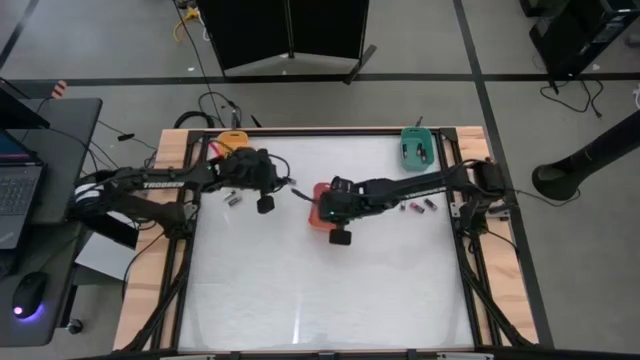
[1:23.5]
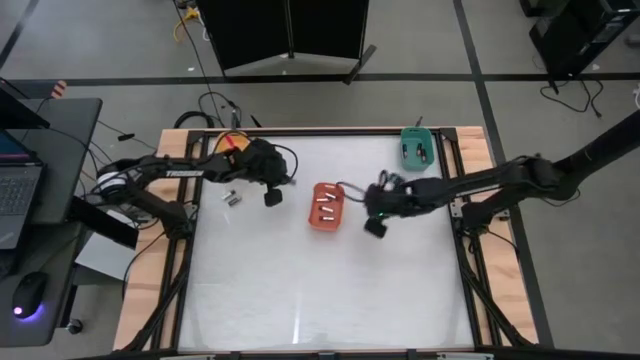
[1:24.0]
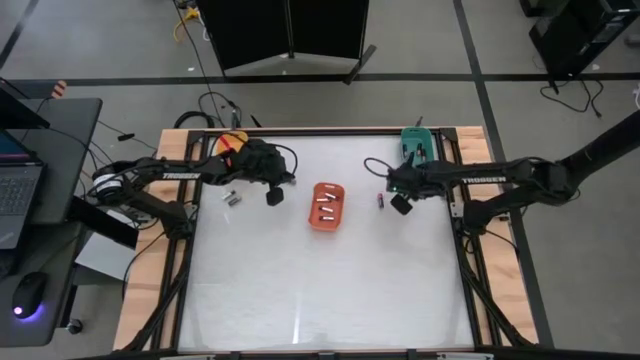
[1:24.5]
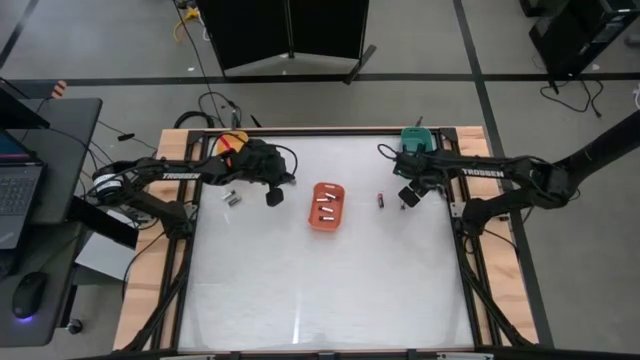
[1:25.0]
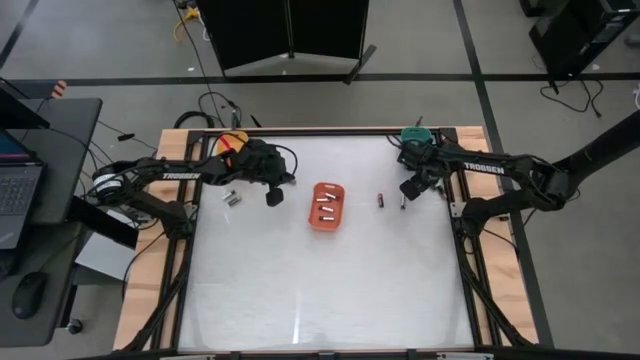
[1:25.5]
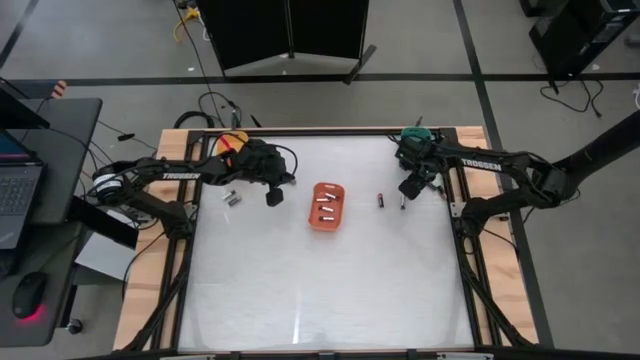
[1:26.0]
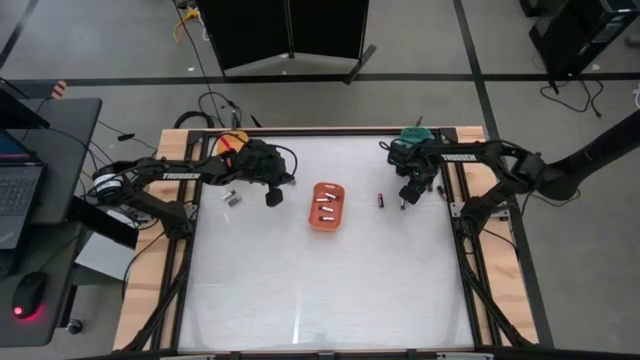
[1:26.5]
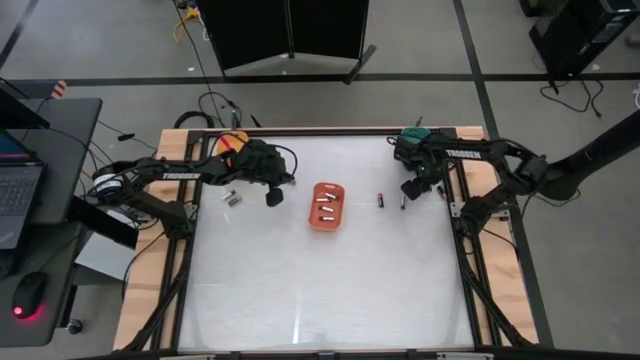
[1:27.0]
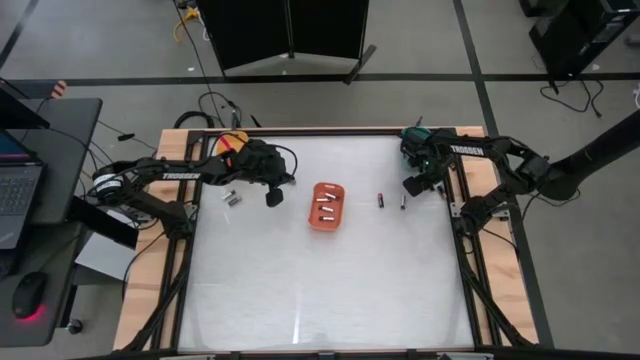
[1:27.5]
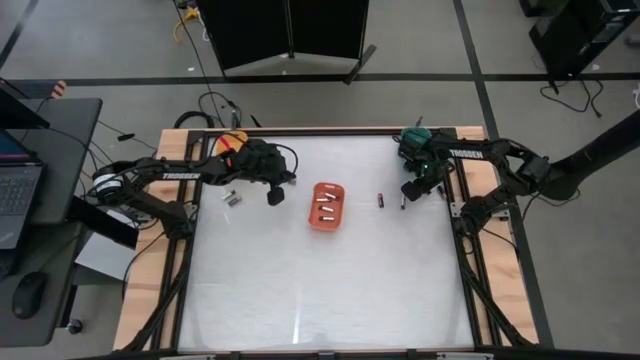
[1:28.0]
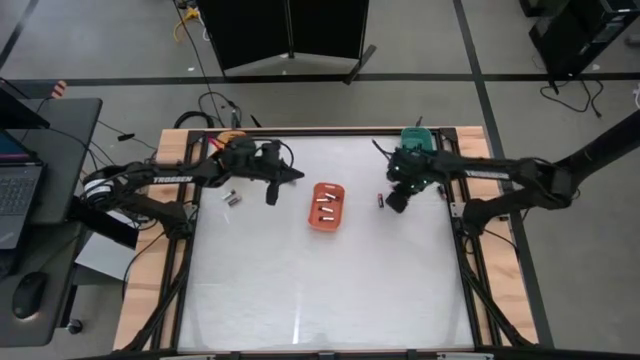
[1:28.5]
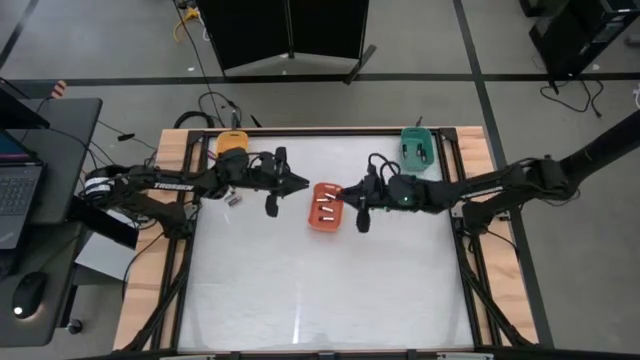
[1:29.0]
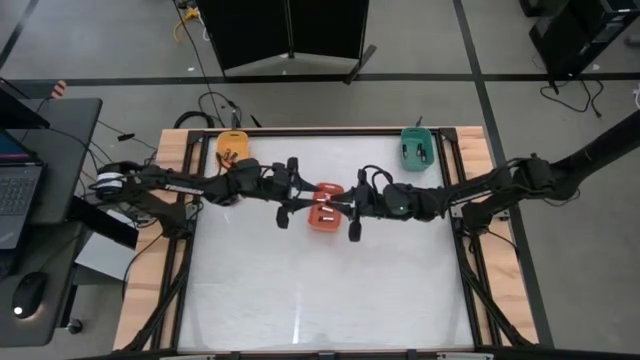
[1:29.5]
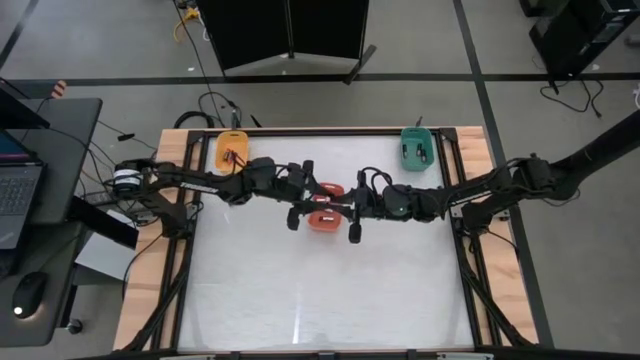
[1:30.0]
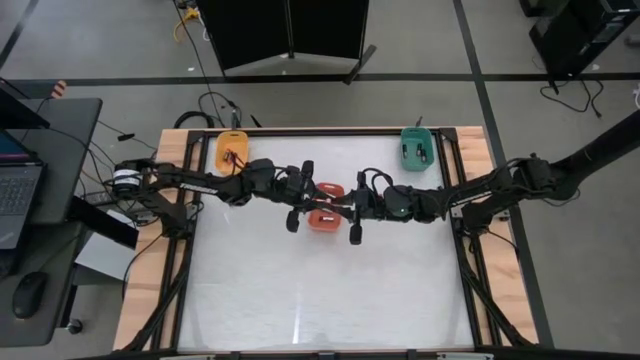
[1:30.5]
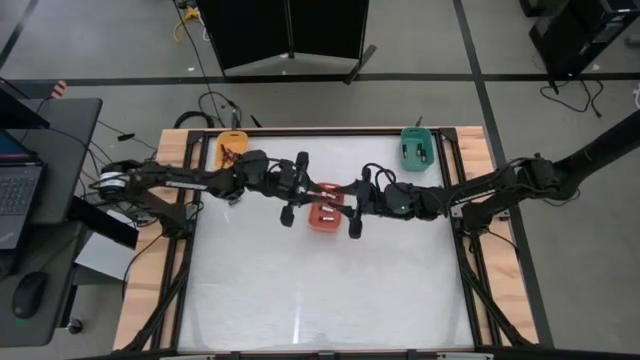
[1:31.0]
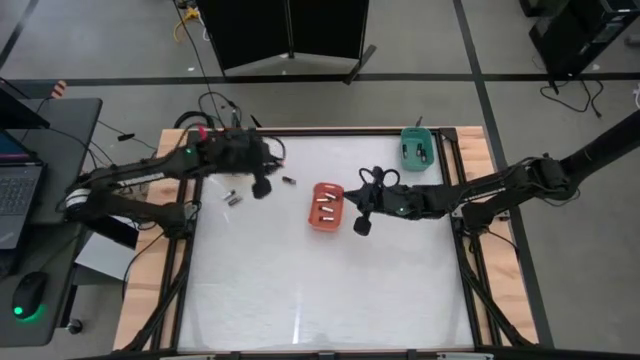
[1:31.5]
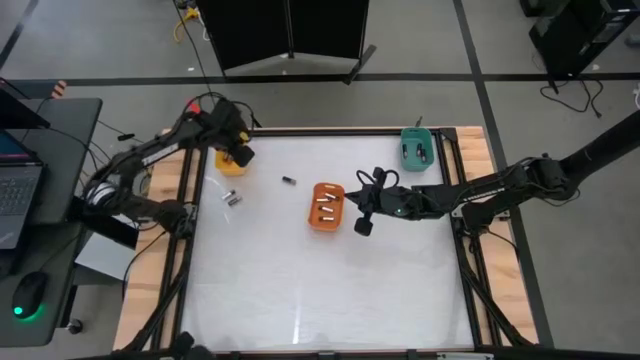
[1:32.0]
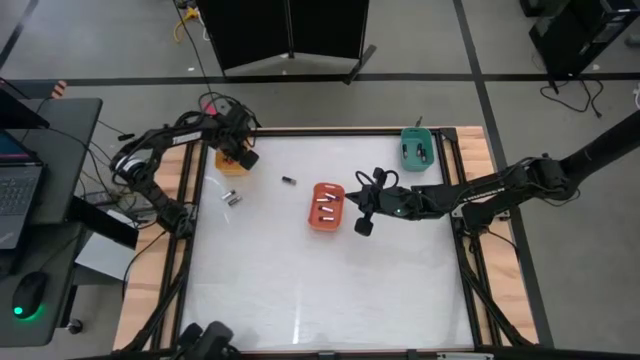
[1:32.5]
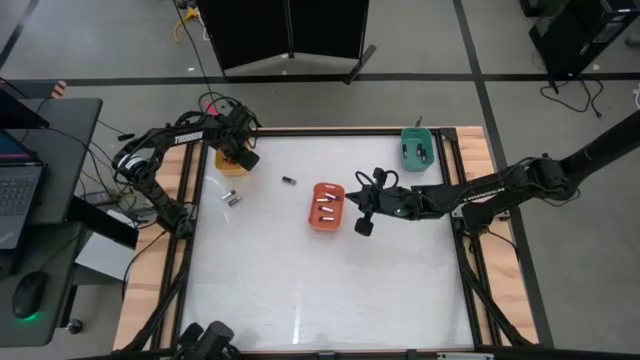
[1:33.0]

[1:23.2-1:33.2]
Task: Sort batteries
Put the black-red battery into the yellow bin

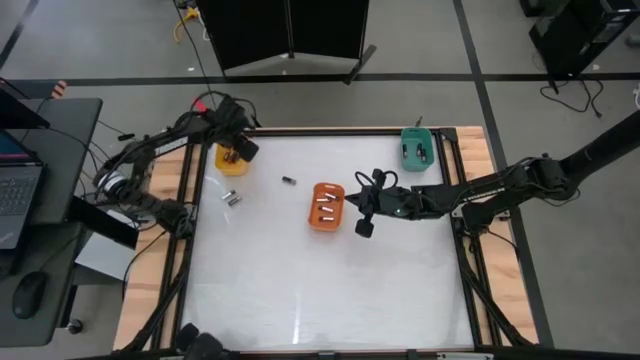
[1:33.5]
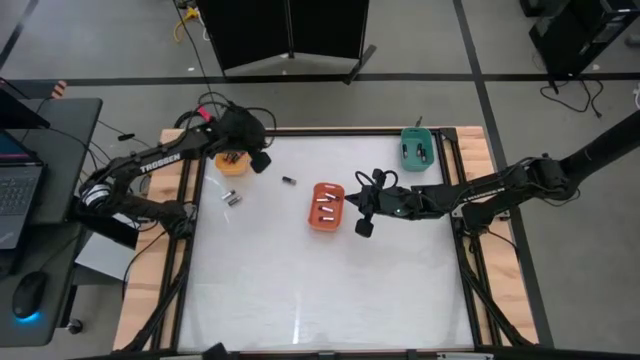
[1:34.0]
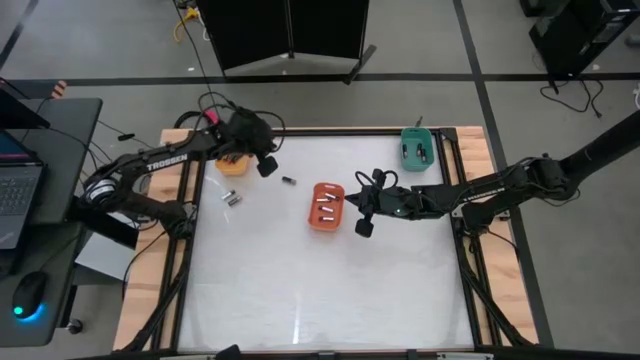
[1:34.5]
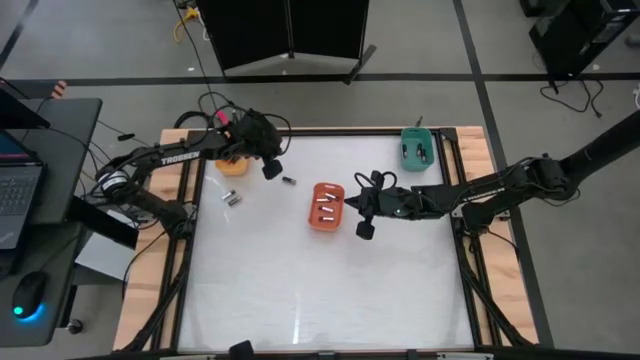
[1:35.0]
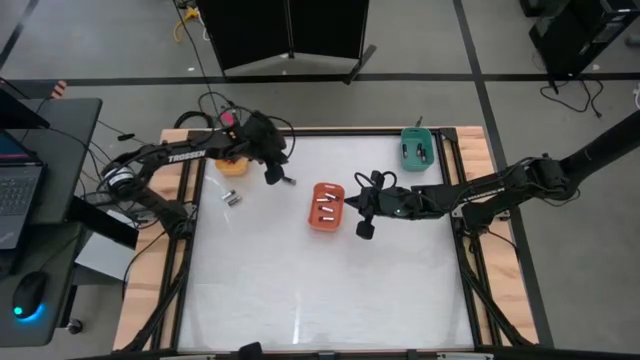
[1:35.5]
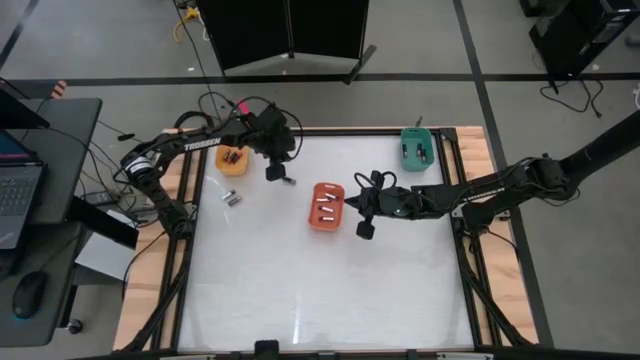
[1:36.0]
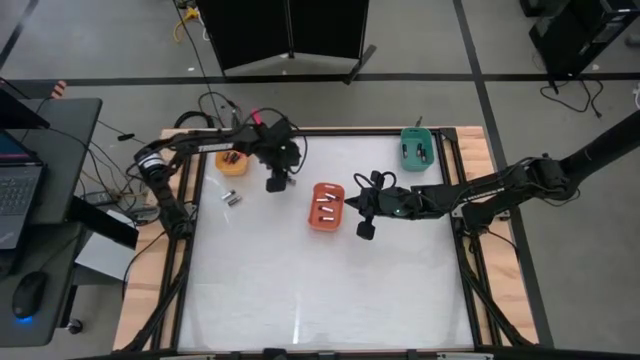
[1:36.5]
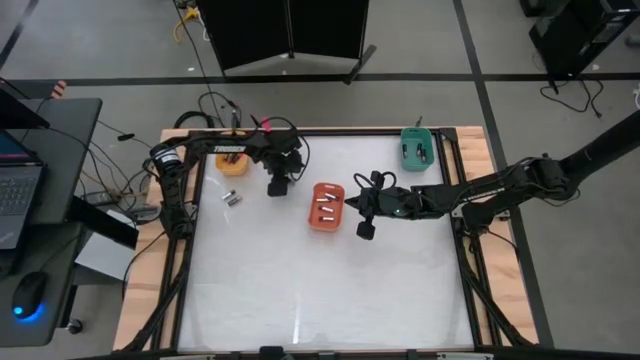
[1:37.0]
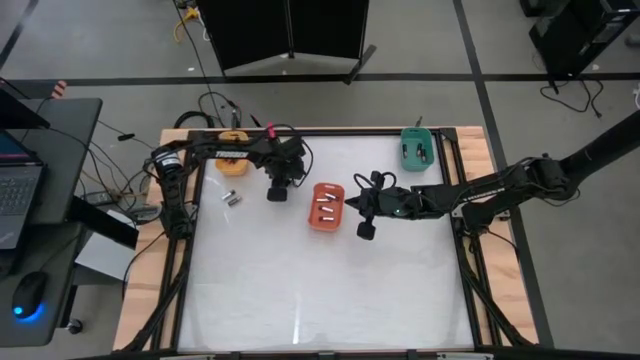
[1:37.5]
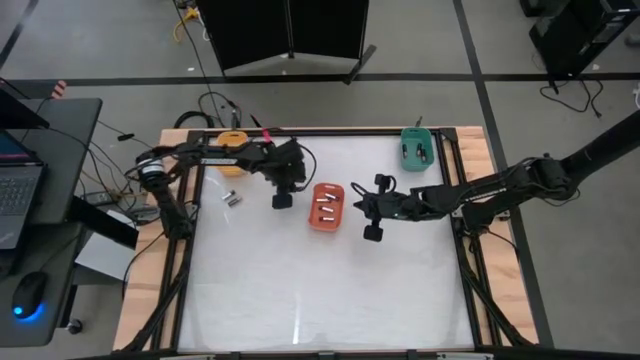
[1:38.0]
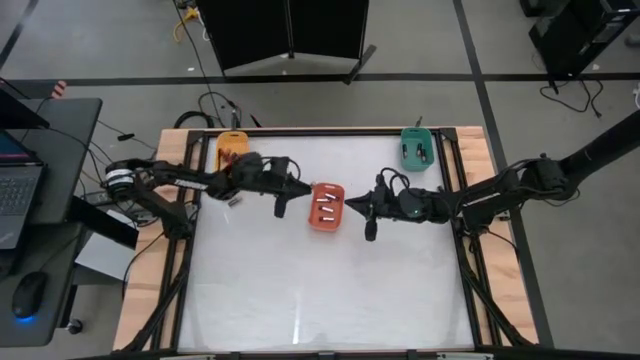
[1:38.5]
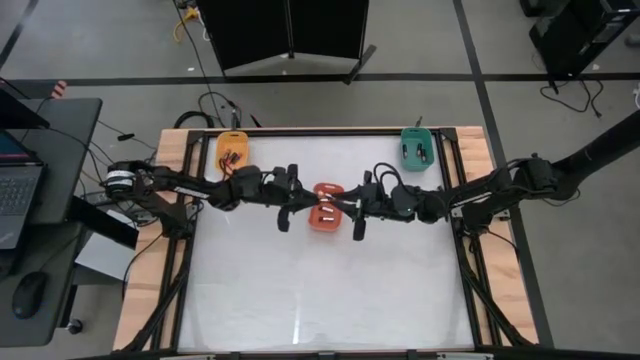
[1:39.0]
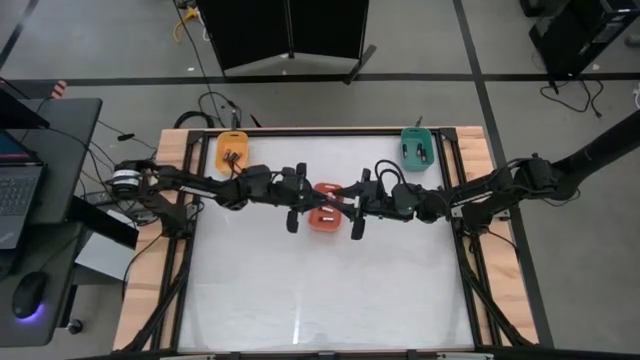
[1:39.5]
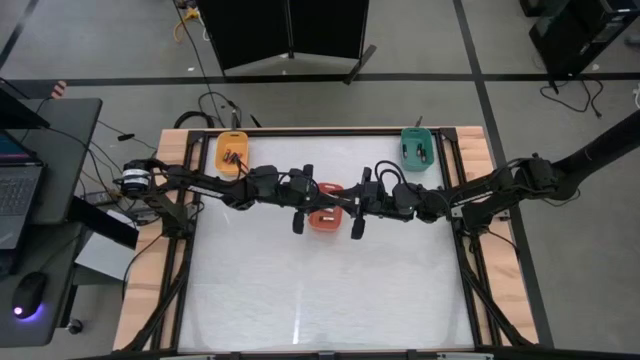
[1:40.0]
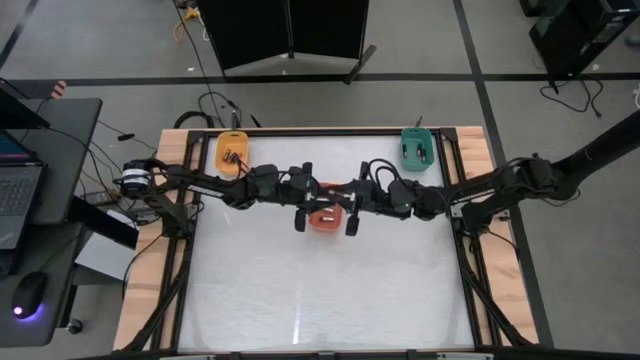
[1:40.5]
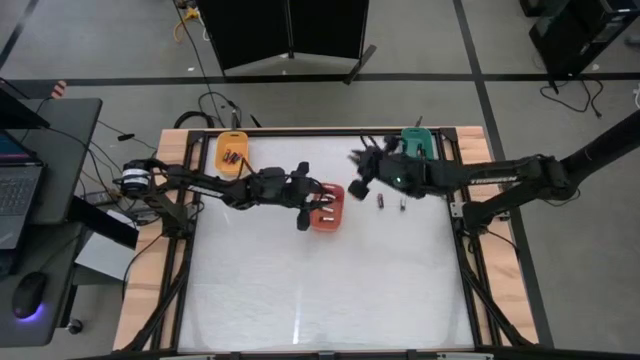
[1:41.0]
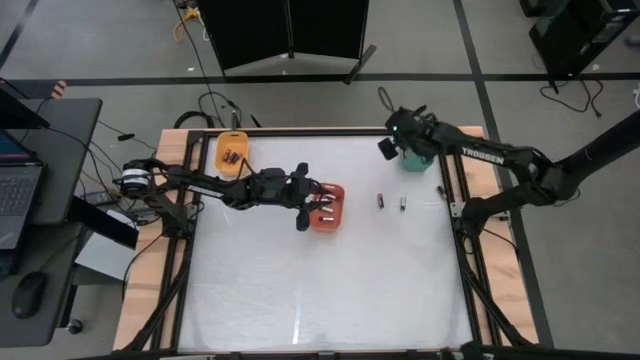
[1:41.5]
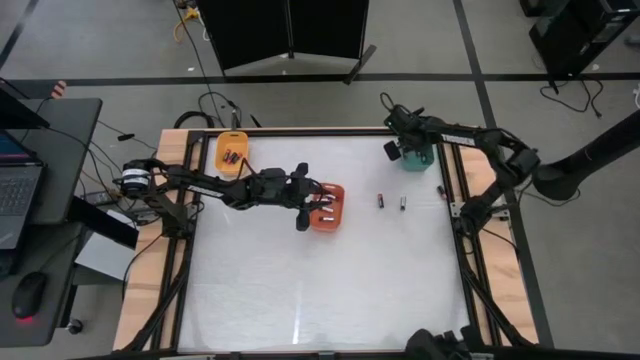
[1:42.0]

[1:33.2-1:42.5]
Put the black-brown battery into the green bin

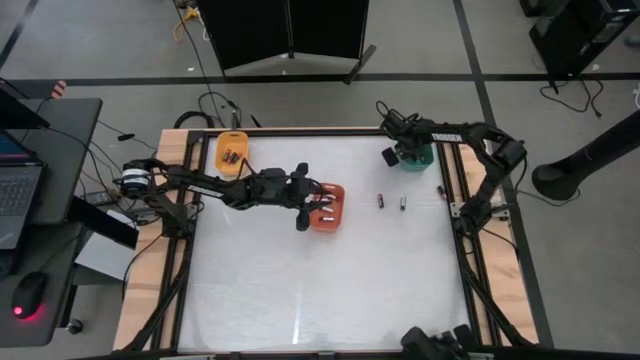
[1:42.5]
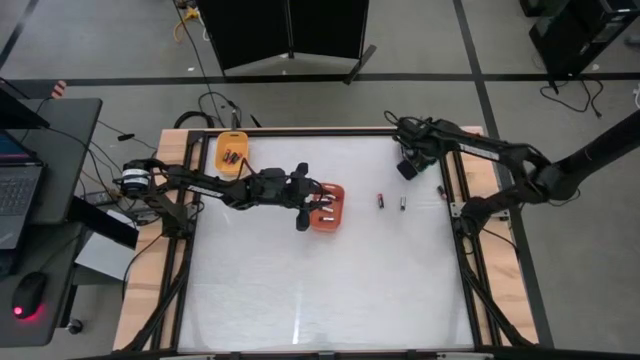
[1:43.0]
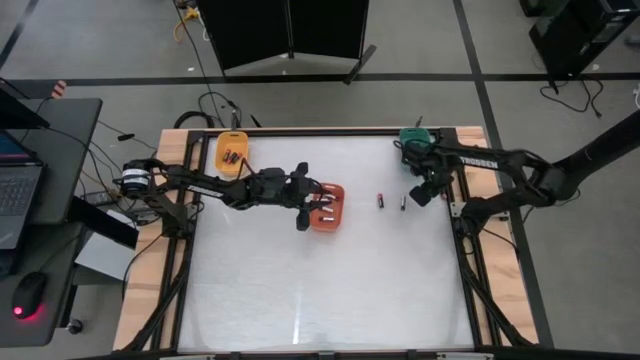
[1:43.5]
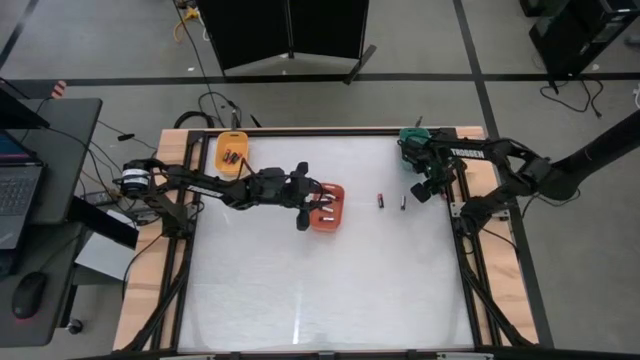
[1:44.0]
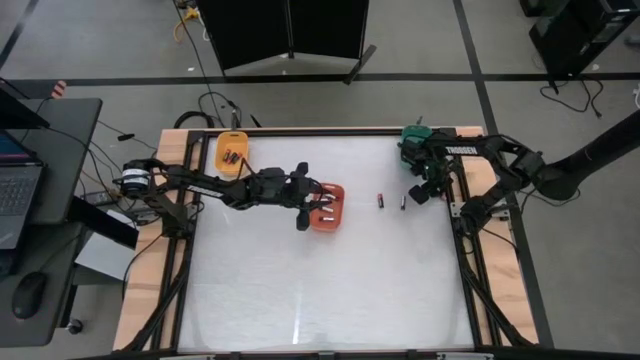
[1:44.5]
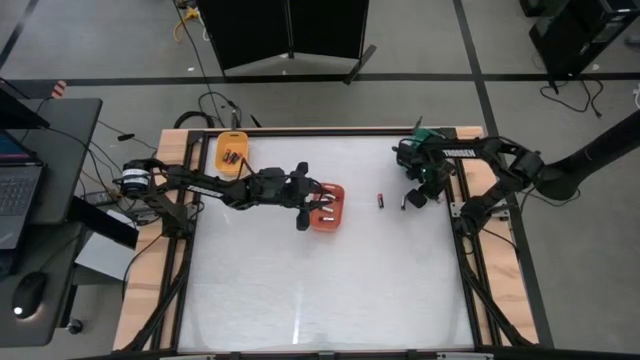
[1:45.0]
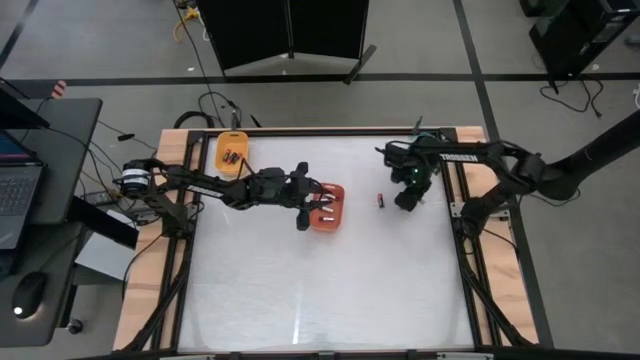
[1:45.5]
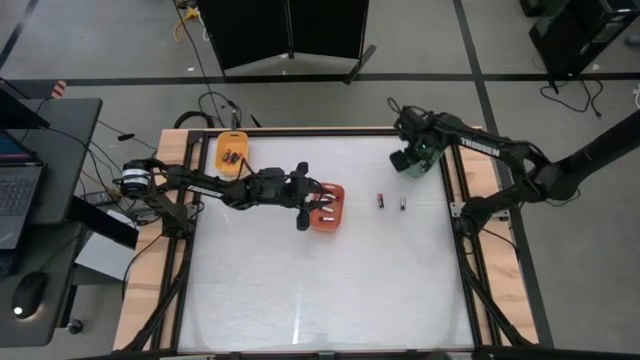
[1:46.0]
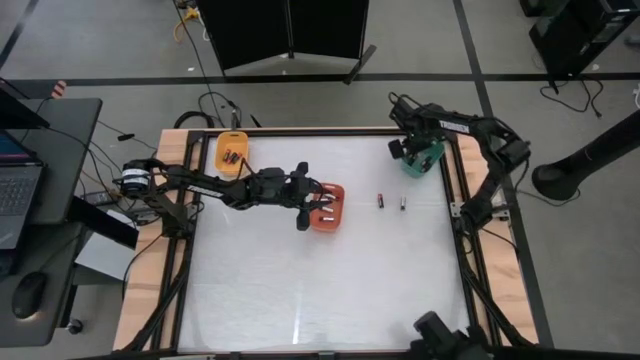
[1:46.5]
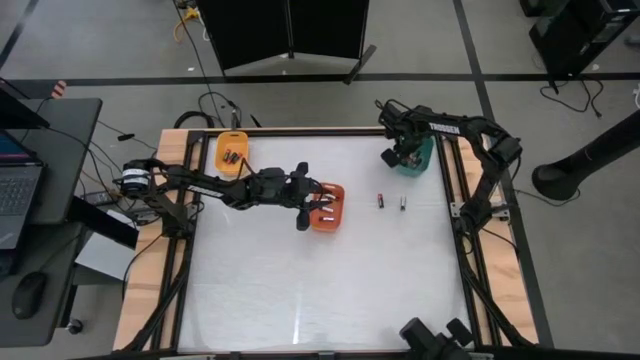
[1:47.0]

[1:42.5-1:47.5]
Put the black-brown battery into the green bin
